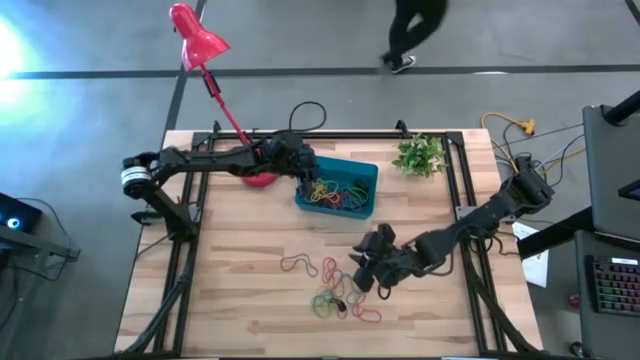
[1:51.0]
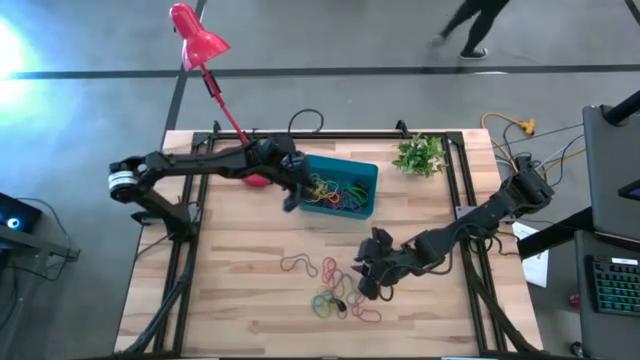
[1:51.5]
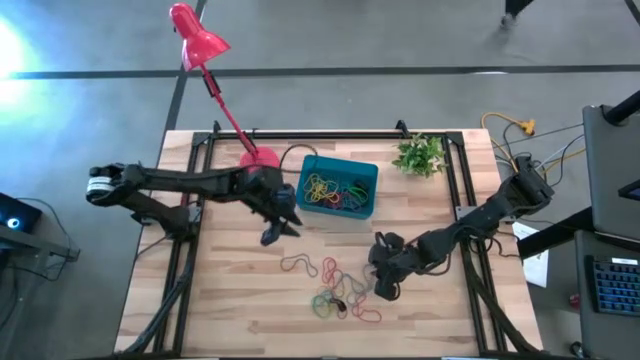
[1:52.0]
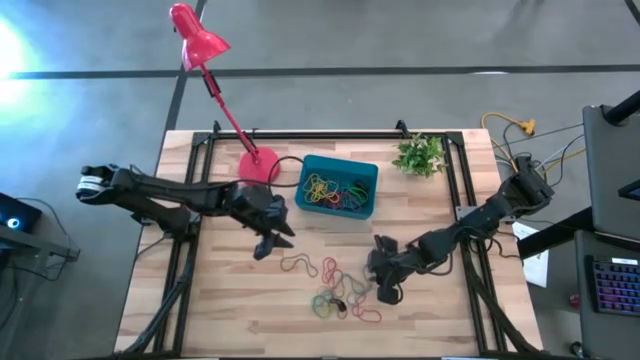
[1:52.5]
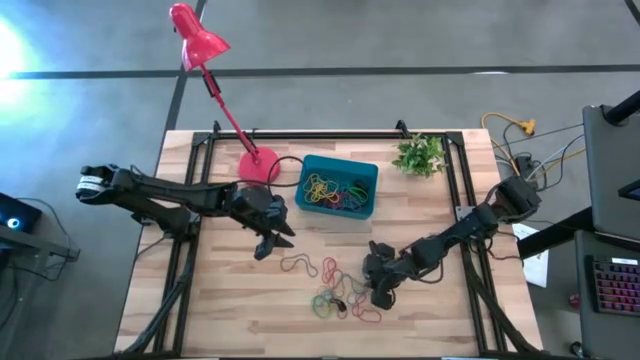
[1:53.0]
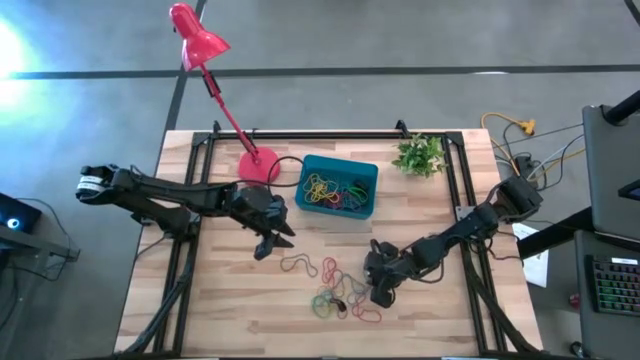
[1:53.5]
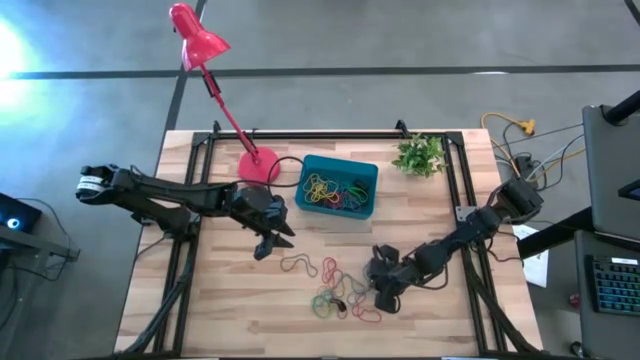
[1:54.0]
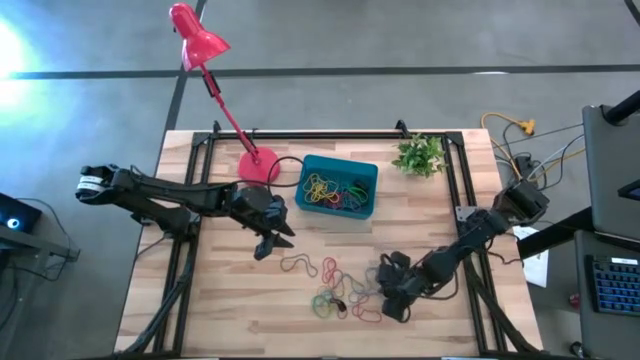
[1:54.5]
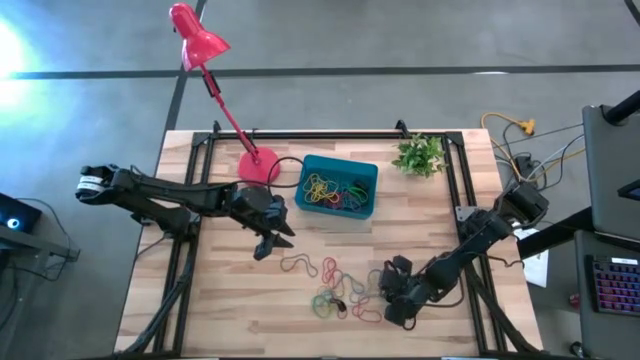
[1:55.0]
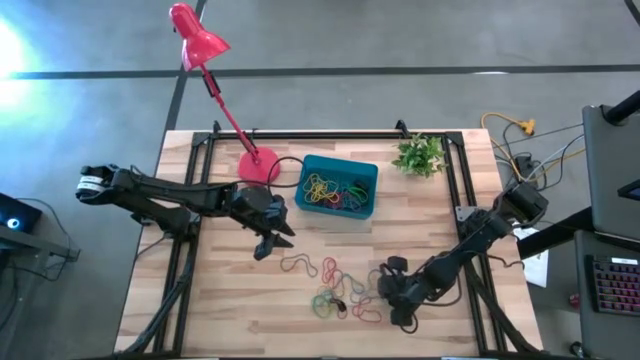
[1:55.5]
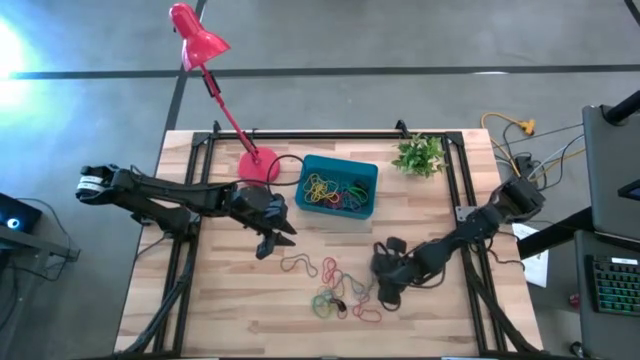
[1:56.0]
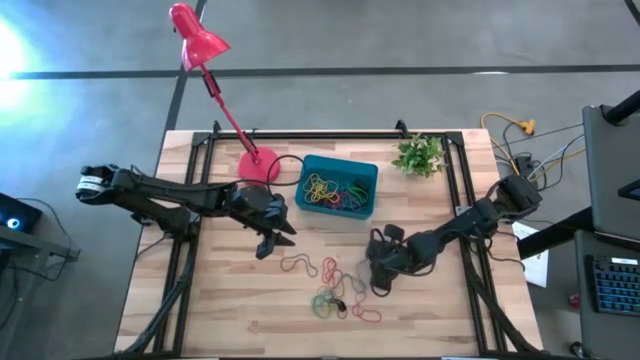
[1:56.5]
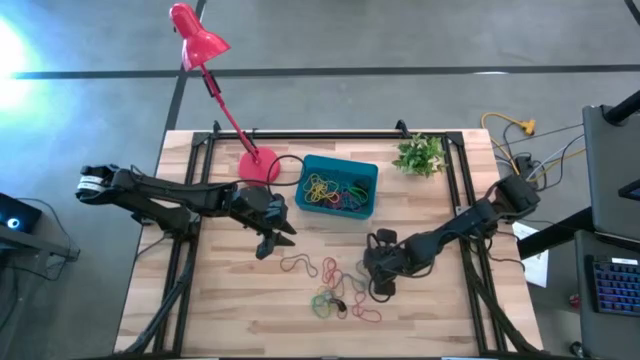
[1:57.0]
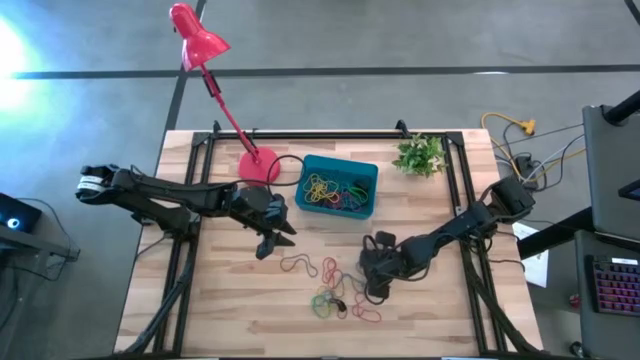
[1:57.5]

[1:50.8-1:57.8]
Task: Pick and place rubber bands into bin
Put the blue rubber band into the blue bin

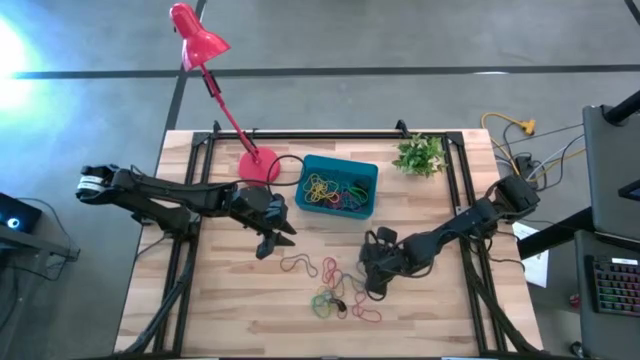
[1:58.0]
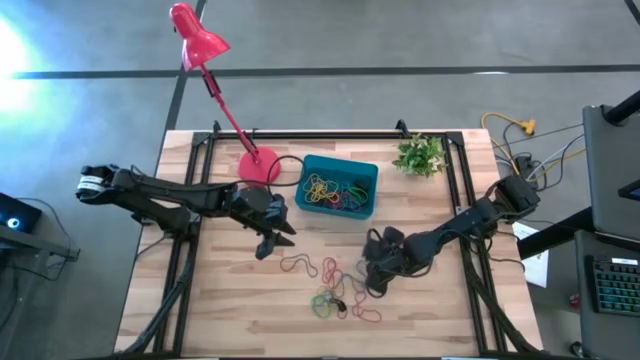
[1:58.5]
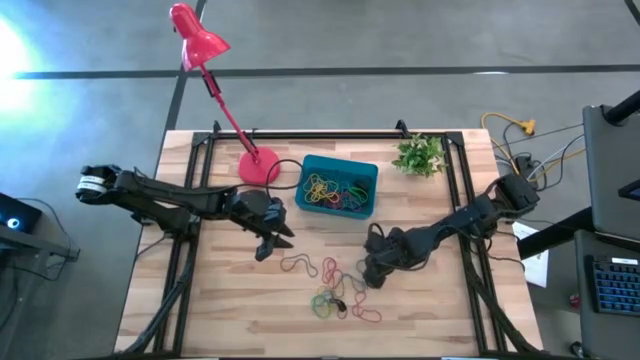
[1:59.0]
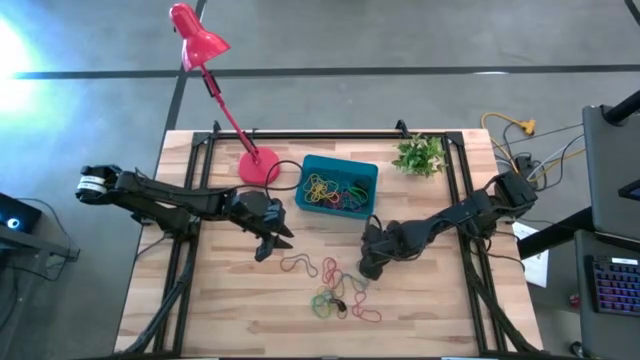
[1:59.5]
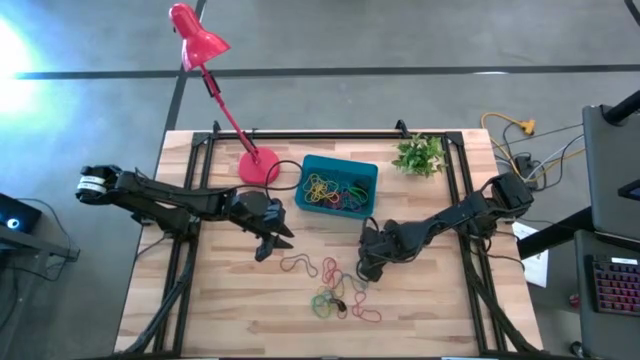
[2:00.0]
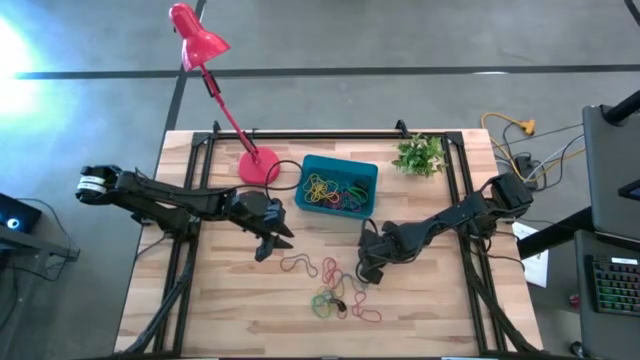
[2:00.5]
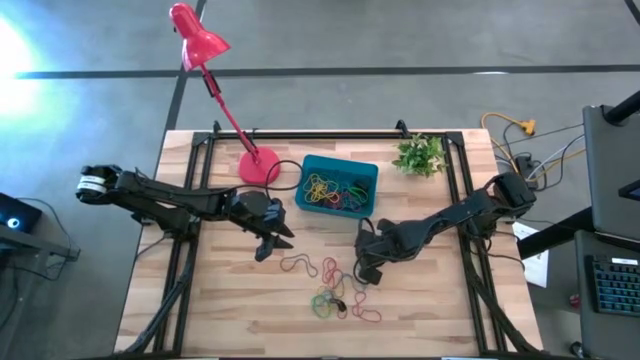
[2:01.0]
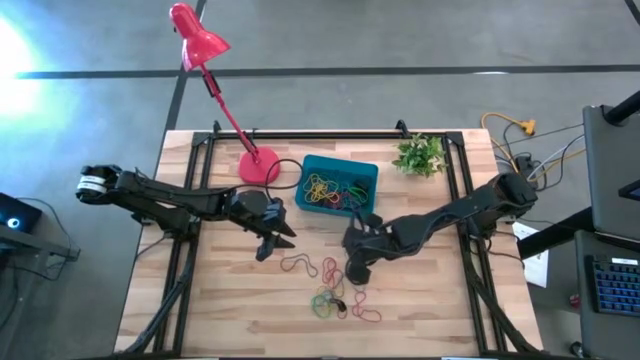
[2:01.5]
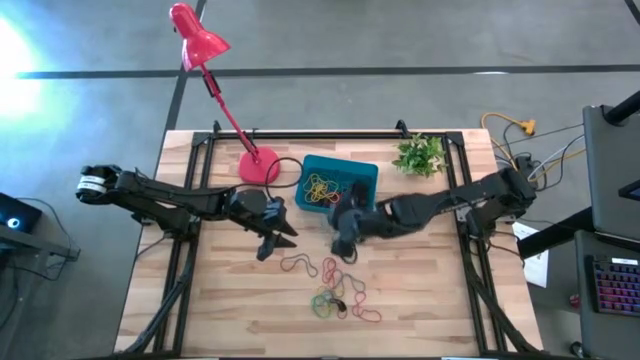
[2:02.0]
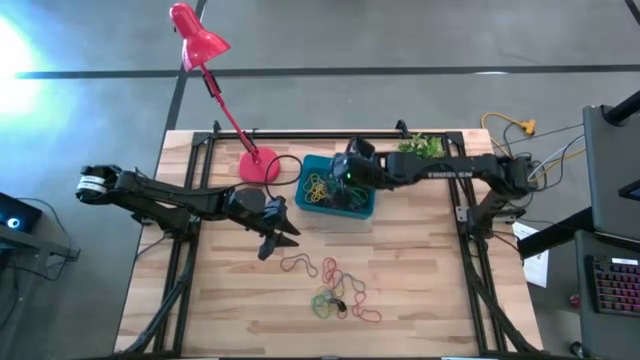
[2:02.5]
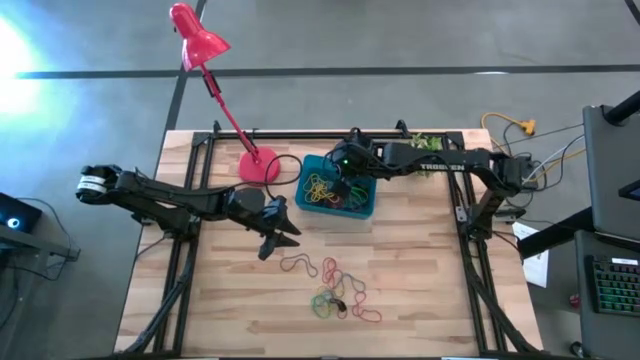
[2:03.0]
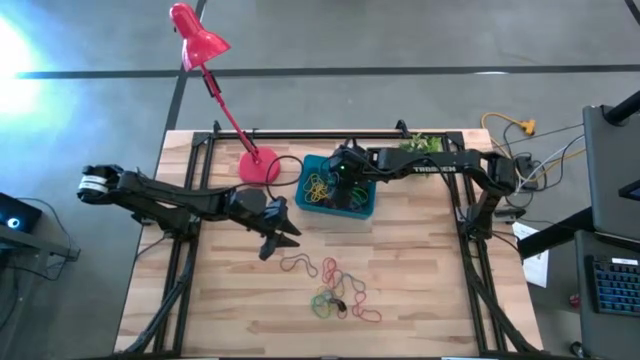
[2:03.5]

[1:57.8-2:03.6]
Put the blue rubber band into the blue bin

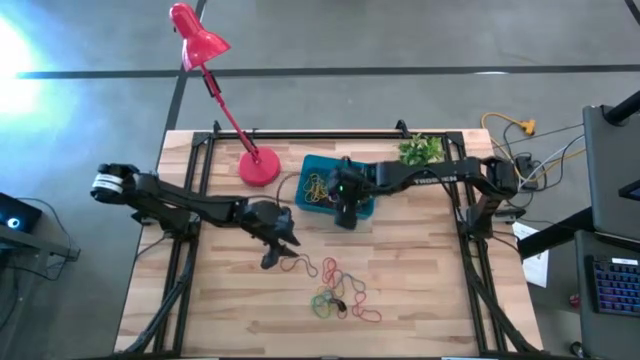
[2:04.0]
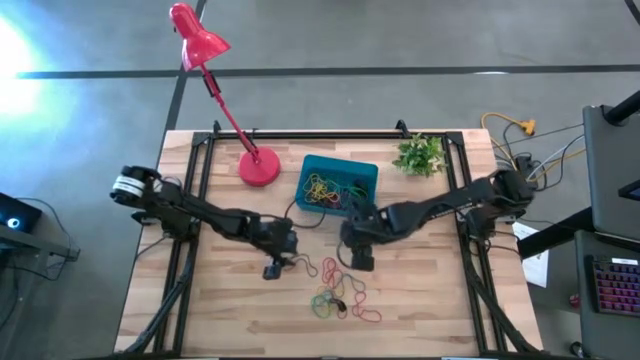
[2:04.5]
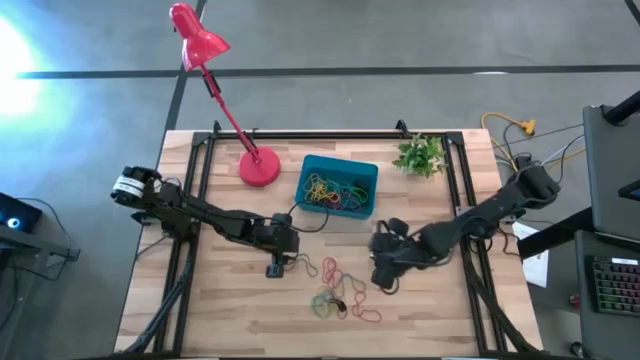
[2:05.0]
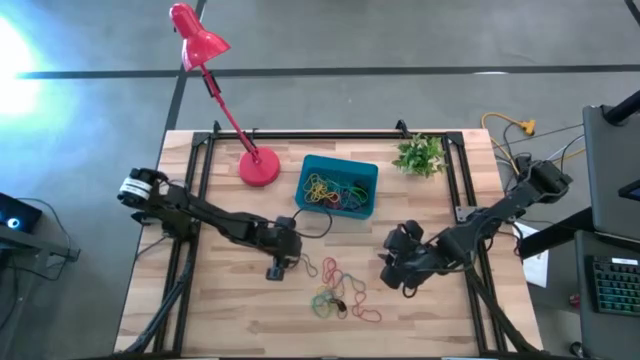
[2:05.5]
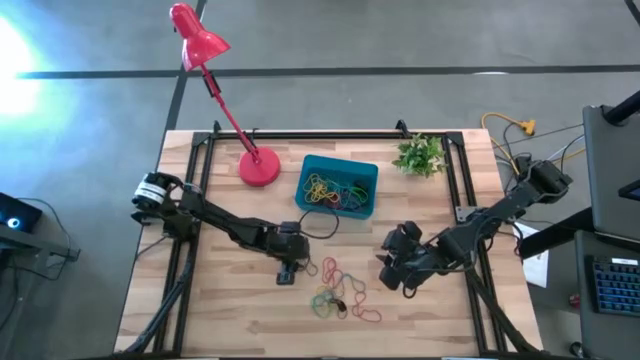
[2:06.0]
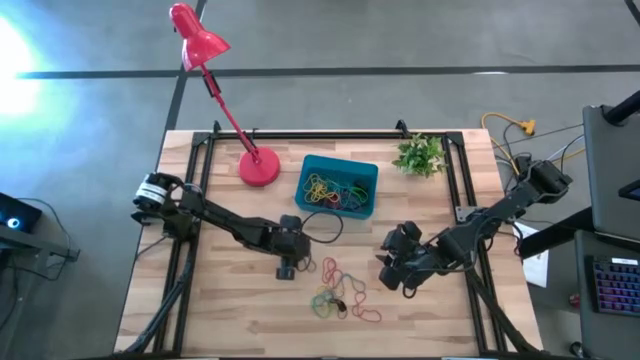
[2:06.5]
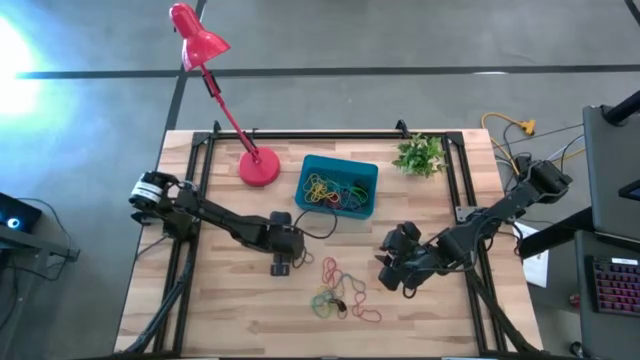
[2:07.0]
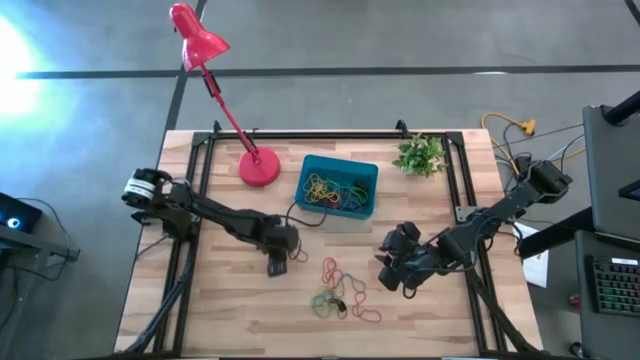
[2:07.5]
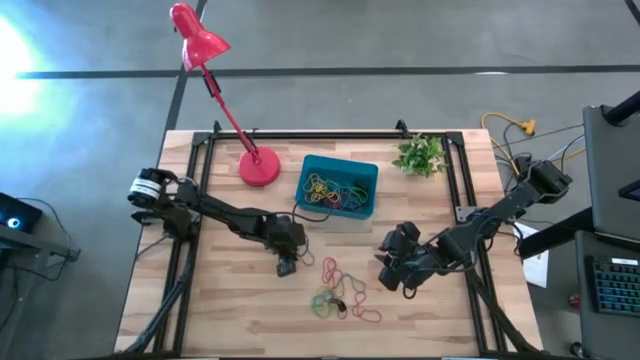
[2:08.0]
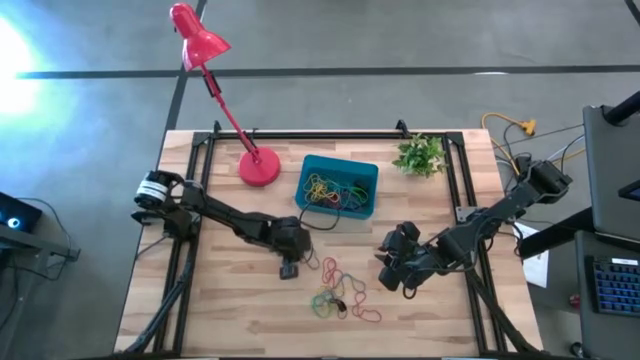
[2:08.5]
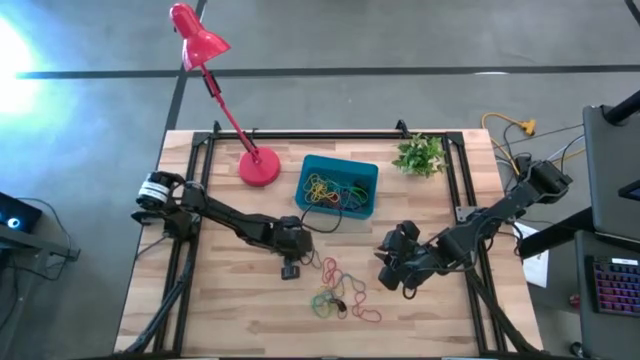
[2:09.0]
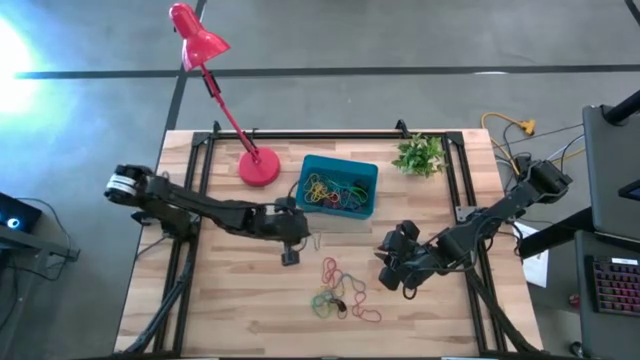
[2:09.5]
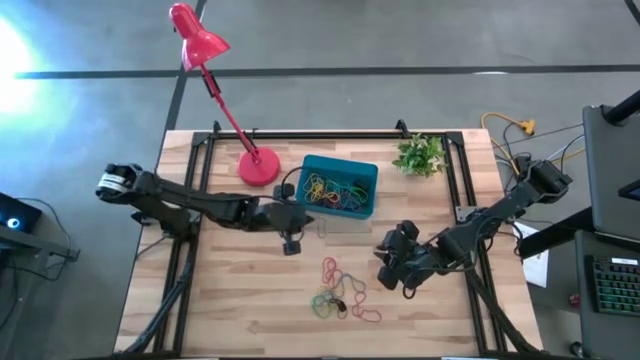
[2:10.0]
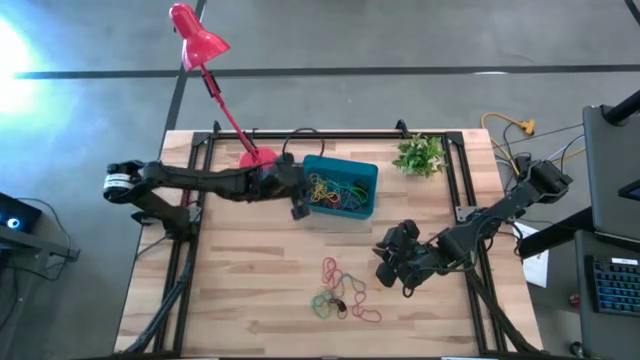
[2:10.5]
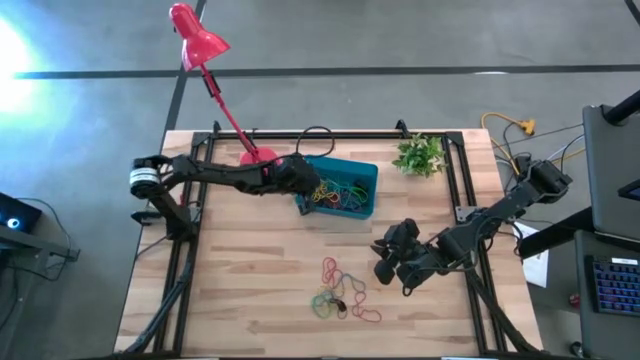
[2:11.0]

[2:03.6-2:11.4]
Put the purple rubber band into the blue bin

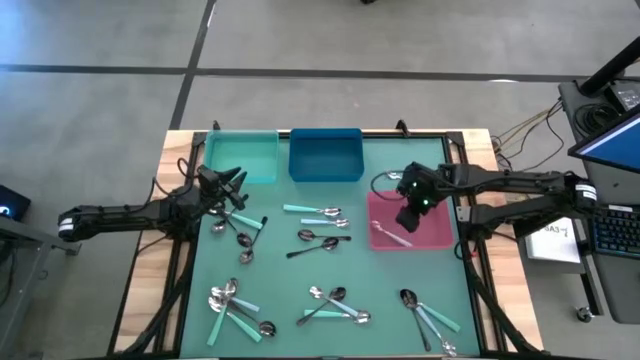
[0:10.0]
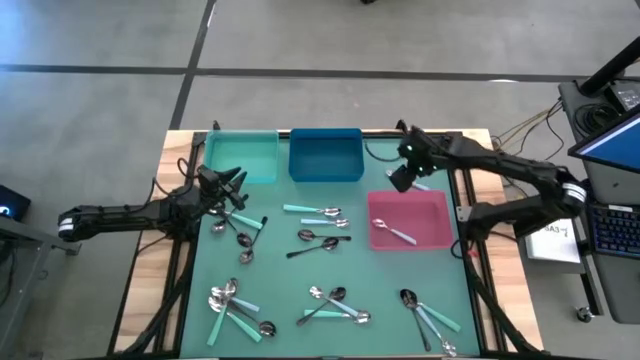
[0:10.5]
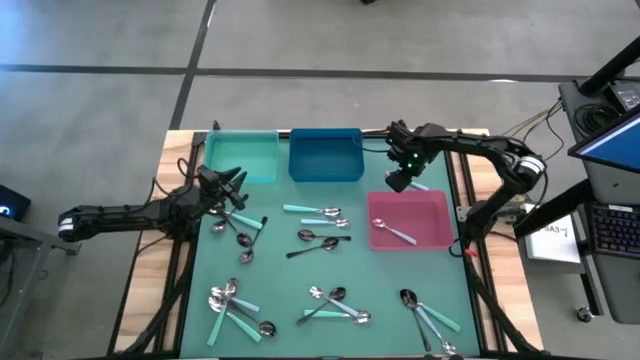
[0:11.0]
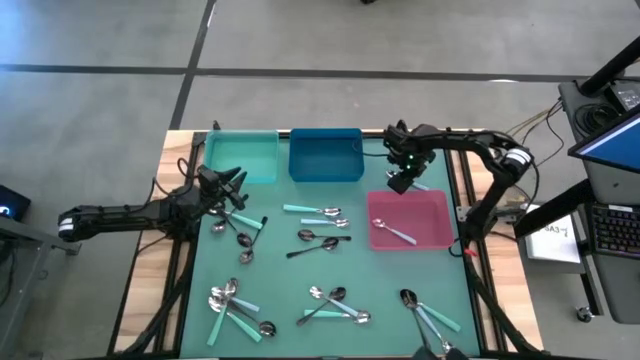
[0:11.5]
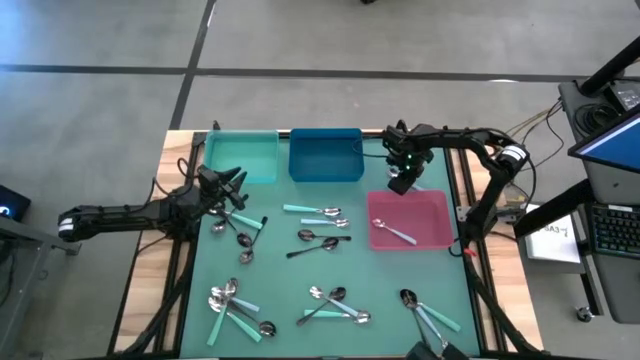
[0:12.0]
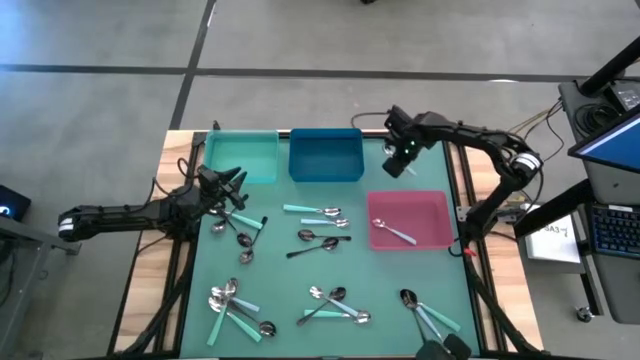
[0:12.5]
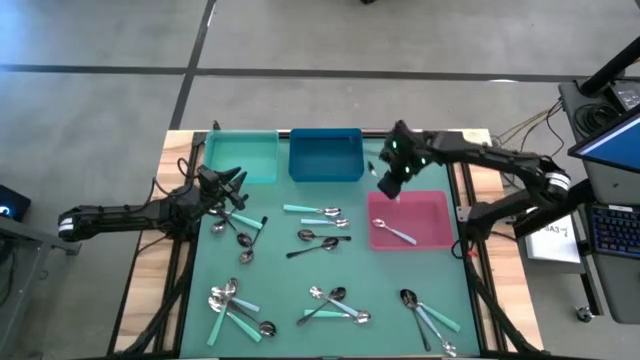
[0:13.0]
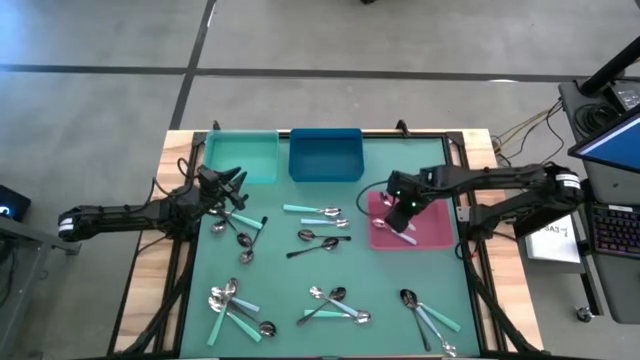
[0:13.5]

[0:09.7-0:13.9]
Task: Sort silverware by color (type)
Put the blue spoon into the red bin
